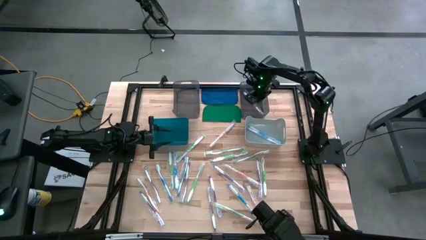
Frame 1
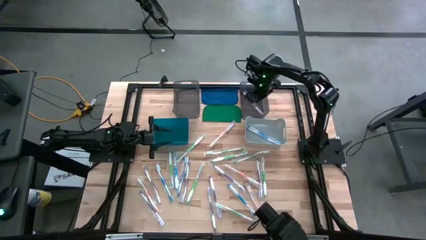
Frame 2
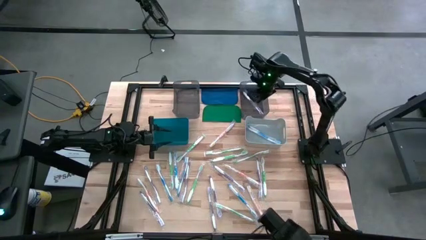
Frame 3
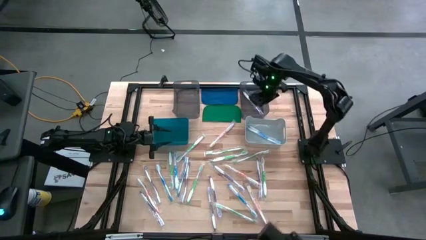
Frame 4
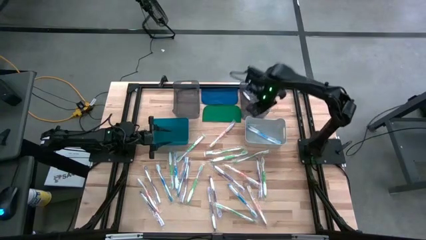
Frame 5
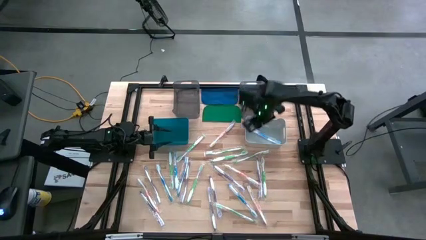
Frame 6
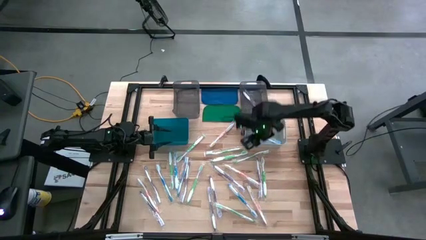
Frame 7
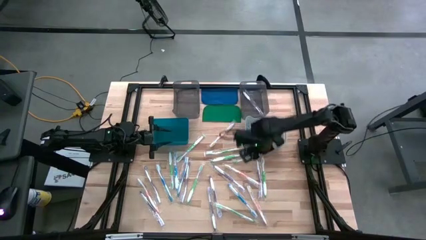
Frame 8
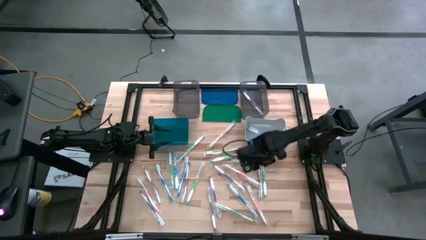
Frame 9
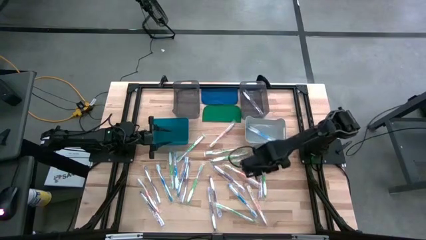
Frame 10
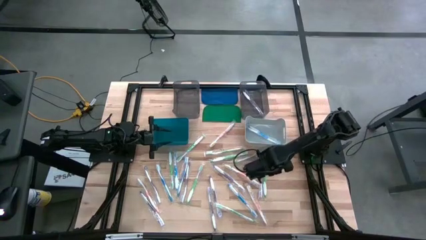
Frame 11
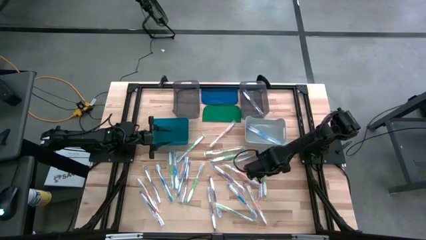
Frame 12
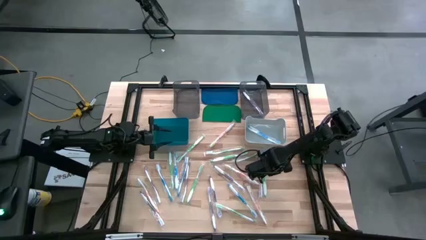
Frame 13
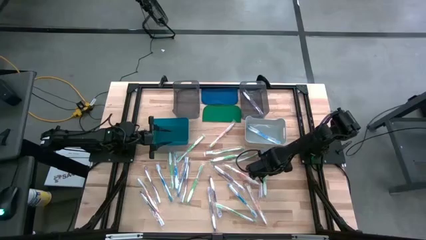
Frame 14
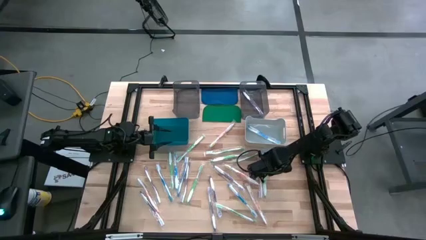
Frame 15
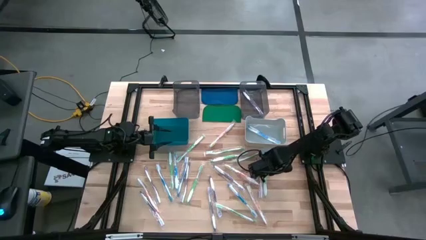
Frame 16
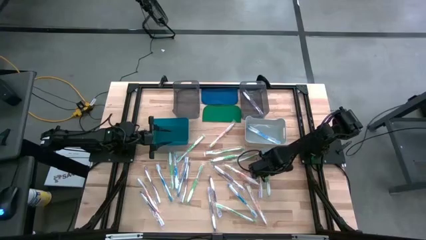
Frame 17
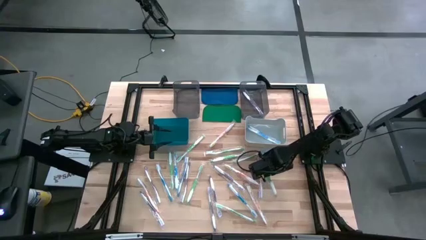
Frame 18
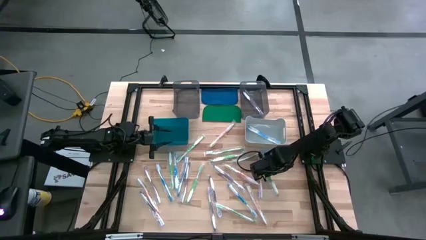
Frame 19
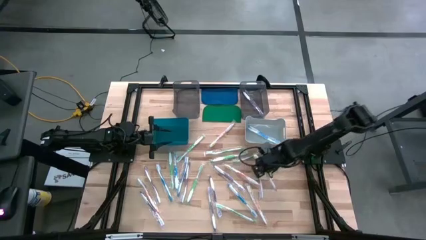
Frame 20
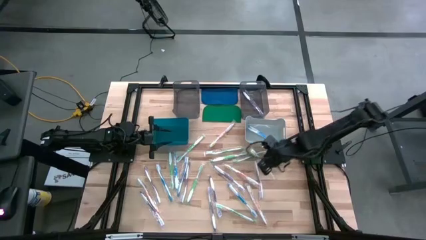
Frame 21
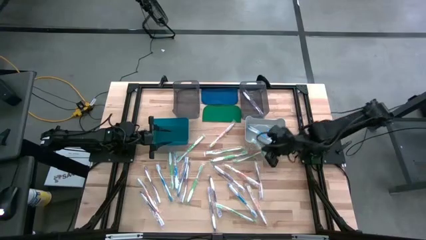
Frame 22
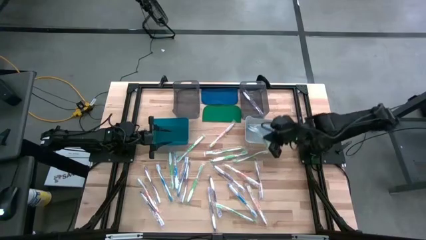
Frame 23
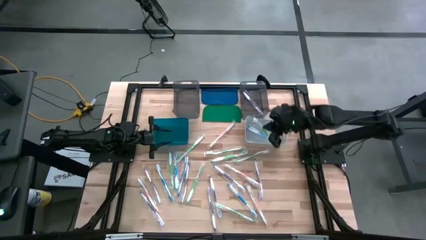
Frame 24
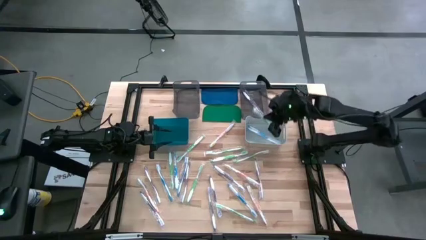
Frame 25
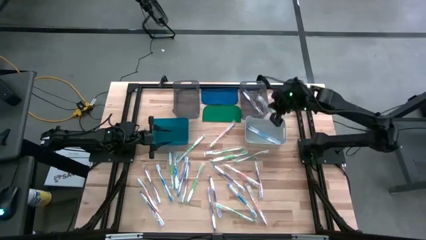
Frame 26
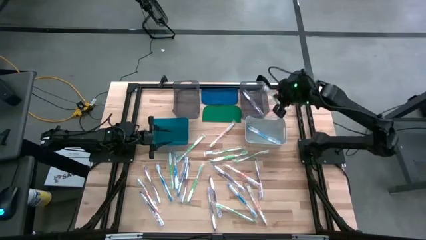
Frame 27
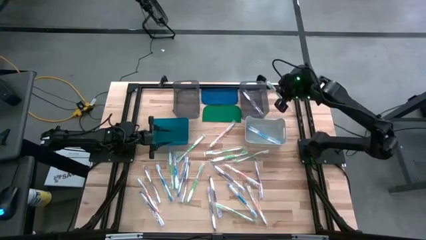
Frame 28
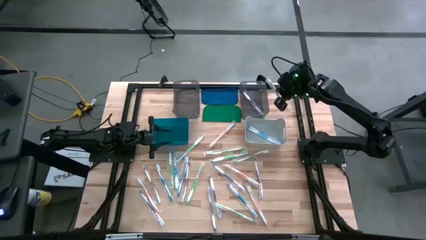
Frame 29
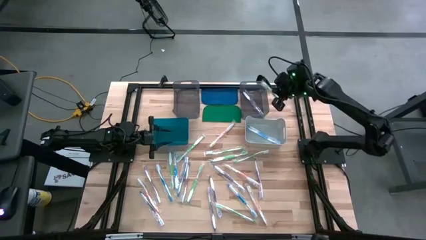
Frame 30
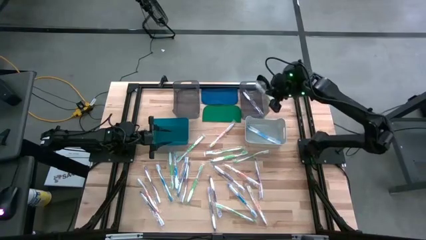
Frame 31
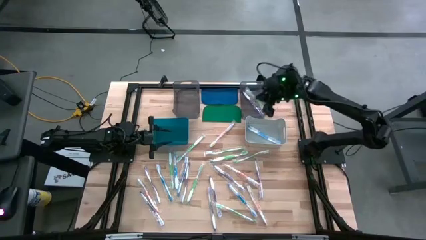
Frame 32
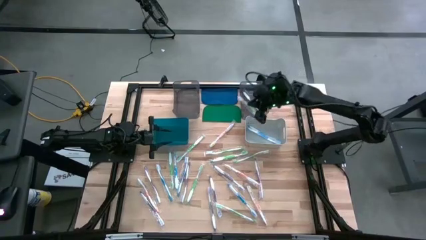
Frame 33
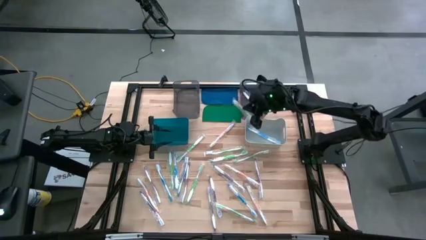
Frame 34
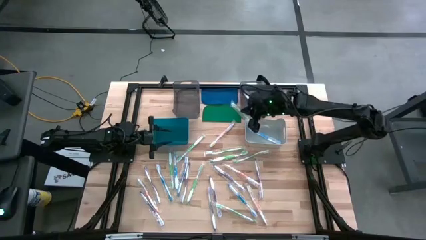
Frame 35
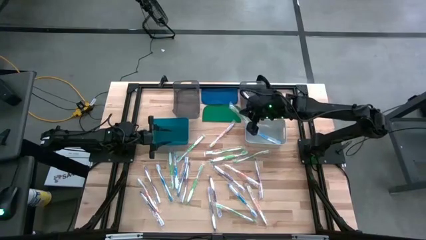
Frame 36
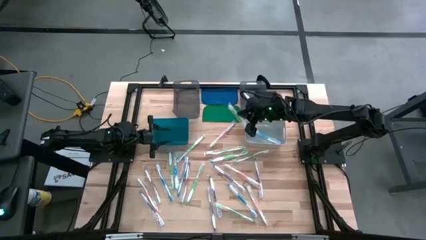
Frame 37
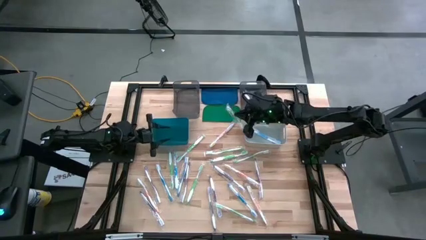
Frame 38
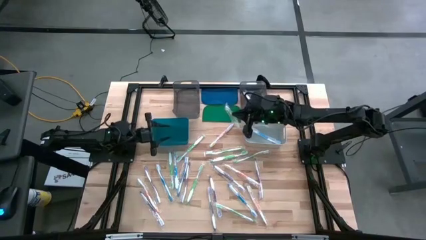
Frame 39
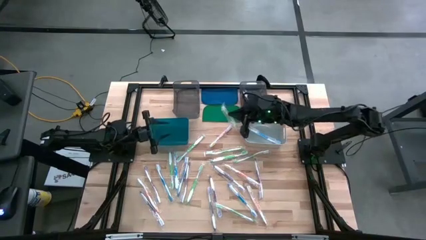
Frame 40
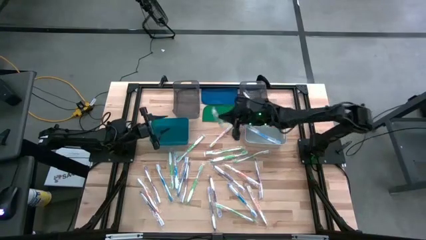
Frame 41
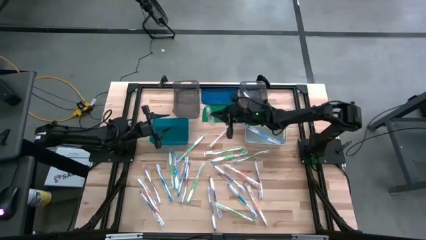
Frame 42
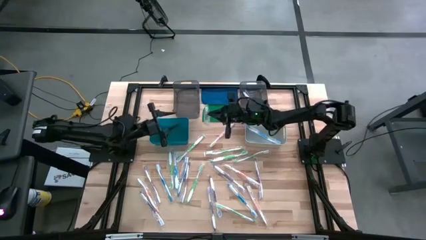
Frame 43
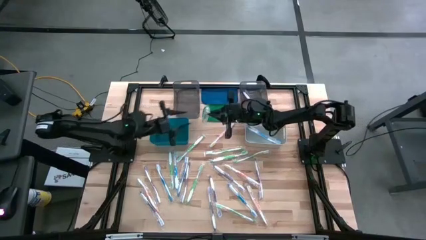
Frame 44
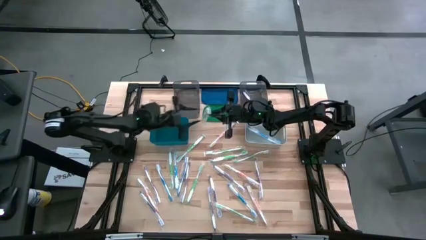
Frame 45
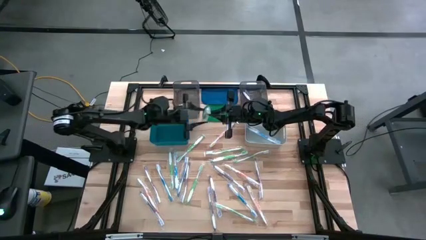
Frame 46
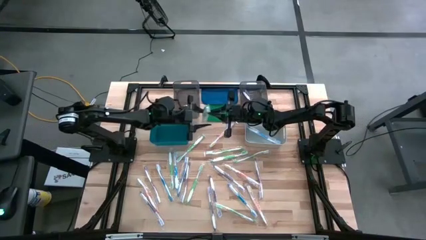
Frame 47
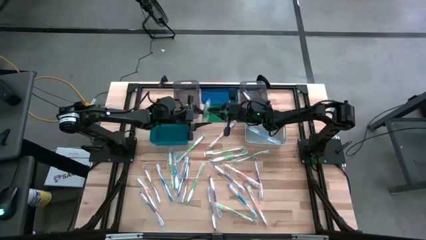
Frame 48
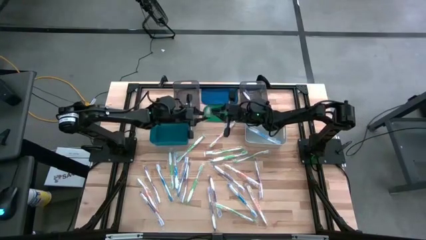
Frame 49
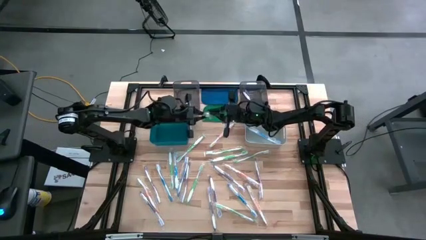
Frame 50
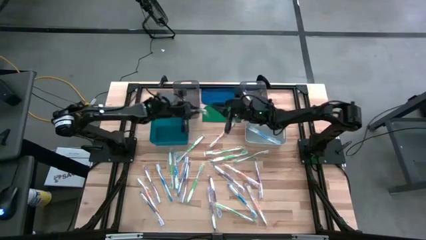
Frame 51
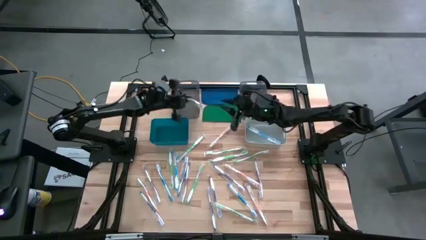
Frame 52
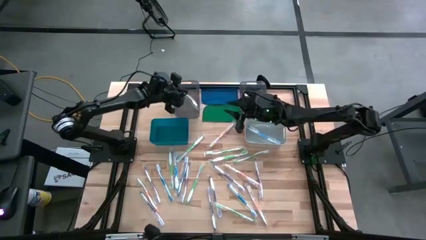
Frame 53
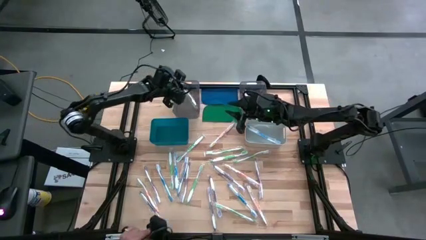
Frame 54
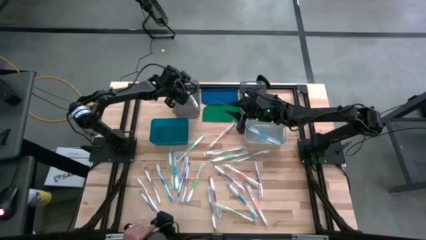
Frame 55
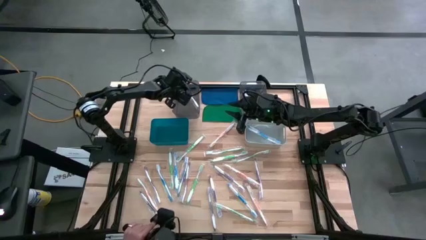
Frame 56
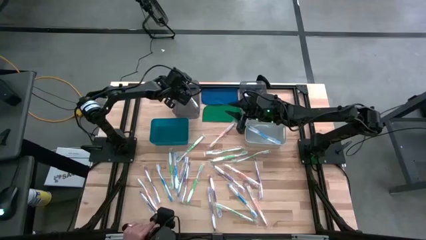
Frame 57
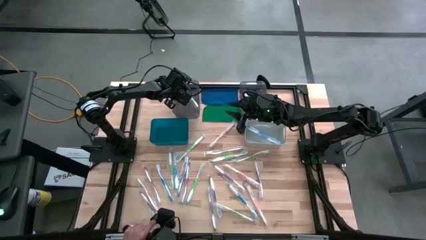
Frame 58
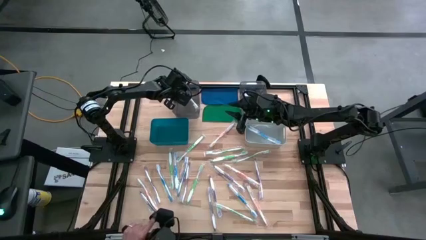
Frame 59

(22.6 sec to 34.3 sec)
Task: Pick & Place Toothbrushes
Put the green toothbrush into the left black bin

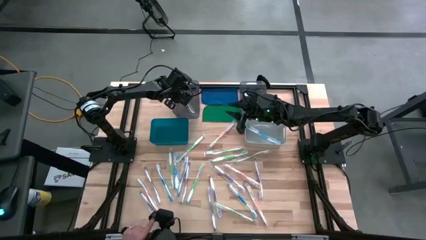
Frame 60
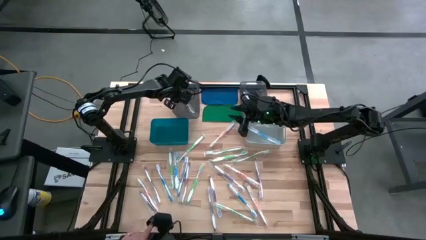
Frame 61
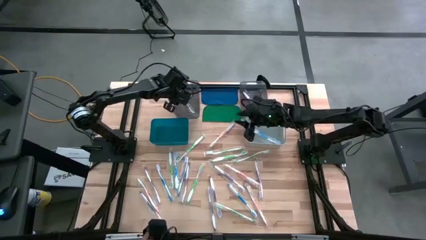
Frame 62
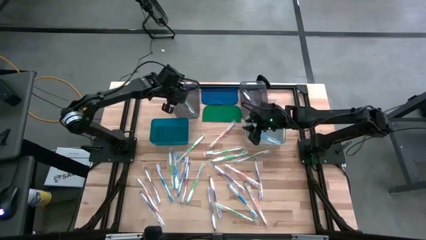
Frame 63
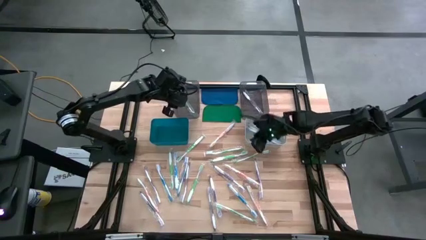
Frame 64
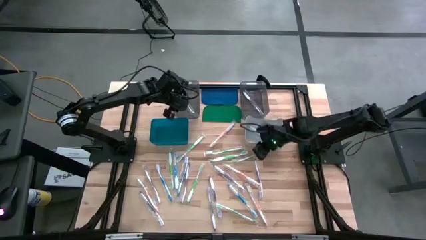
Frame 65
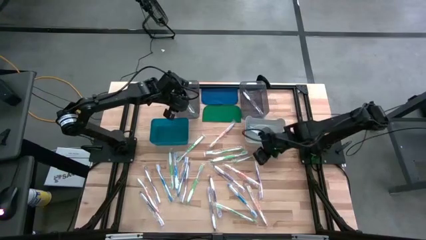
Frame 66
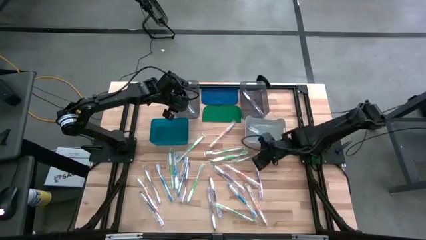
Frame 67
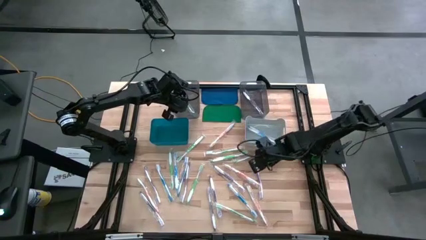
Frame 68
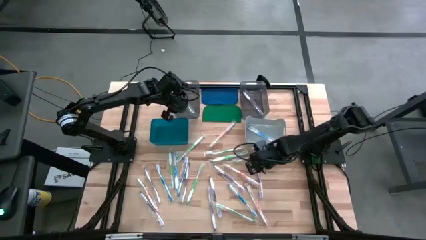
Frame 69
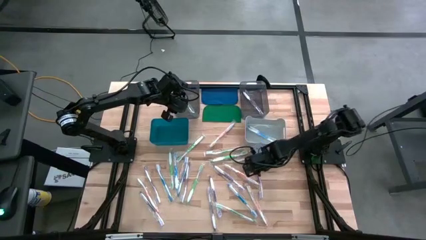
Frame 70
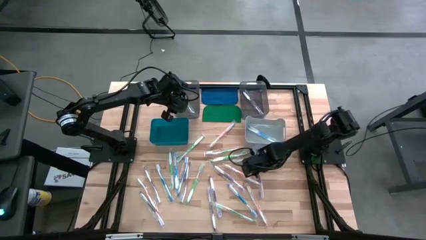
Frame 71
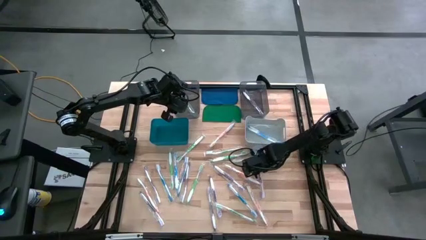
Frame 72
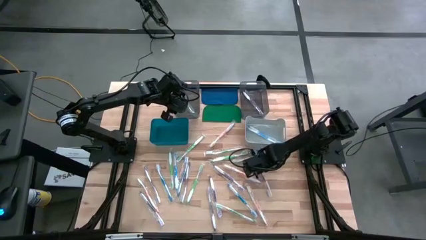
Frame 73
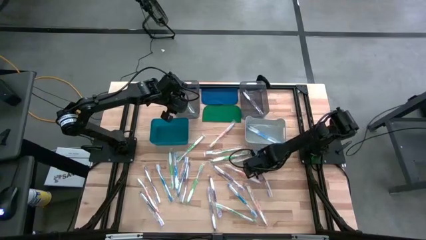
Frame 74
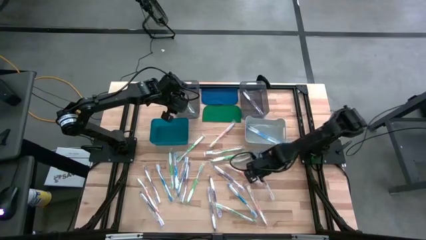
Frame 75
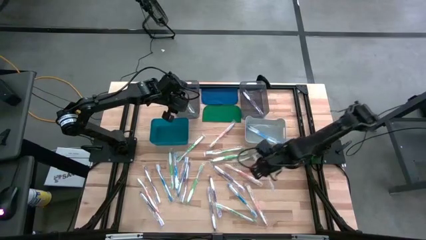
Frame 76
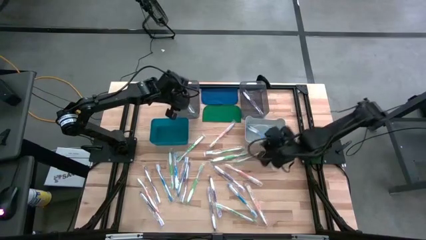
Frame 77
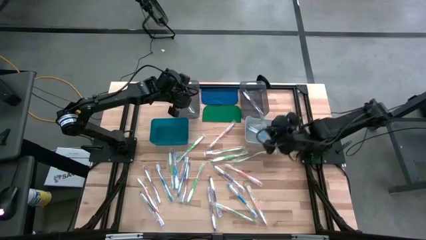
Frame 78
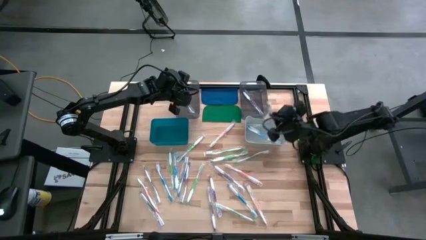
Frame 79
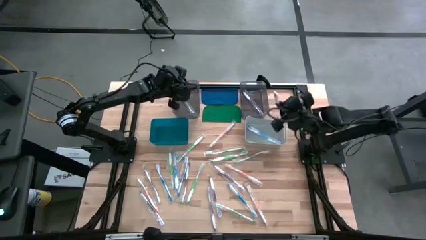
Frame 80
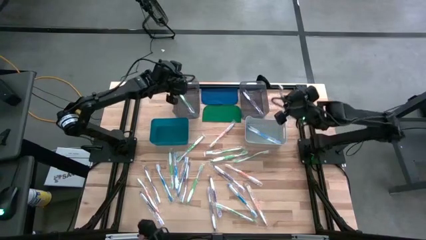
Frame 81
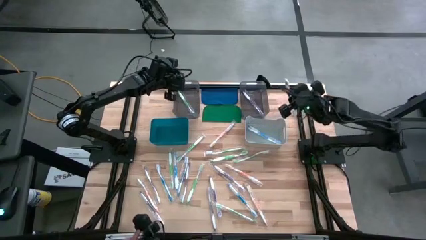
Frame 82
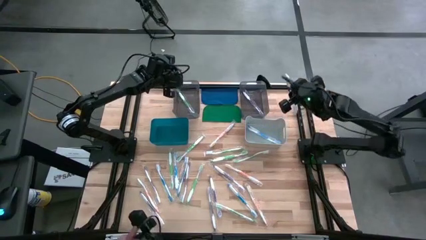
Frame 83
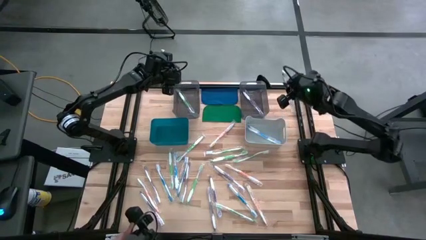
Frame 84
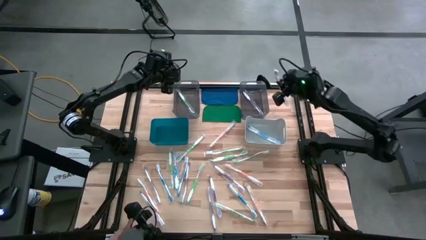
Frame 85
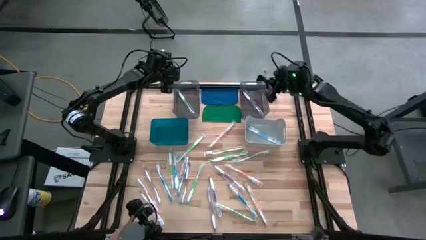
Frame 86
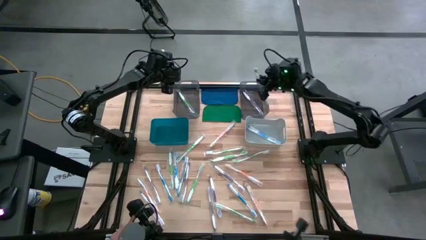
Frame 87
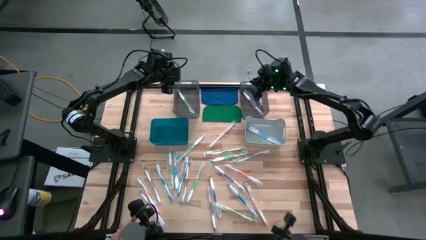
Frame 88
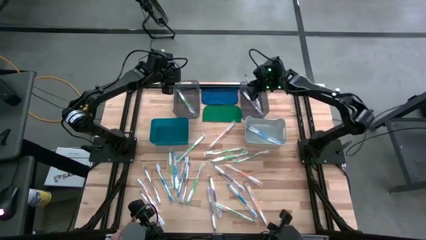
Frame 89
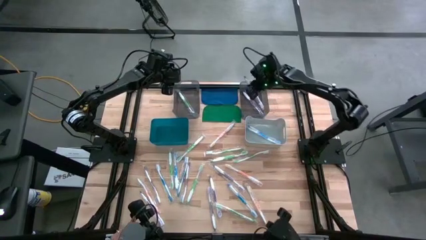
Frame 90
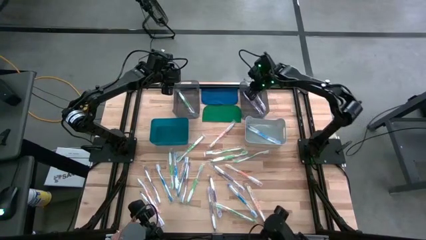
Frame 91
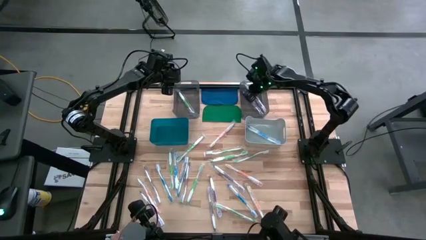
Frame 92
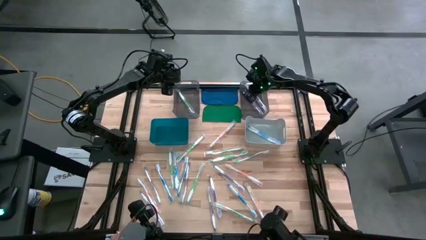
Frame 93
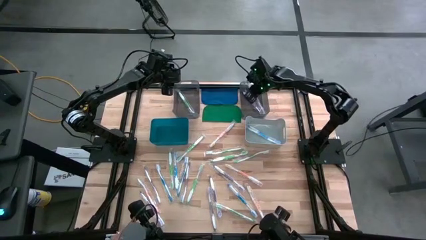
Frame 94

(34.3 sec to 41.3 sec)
Put the violet toothbrush into the right black bin
